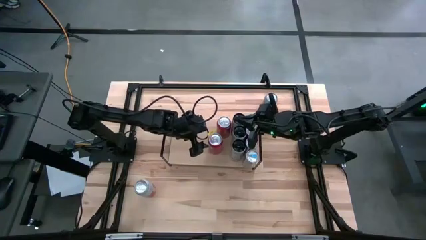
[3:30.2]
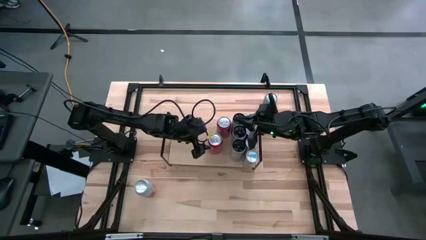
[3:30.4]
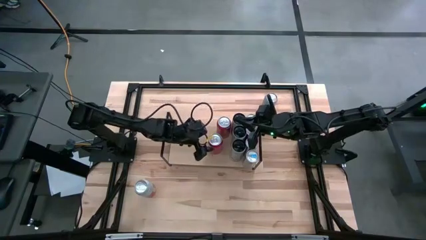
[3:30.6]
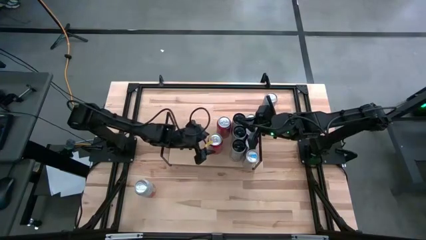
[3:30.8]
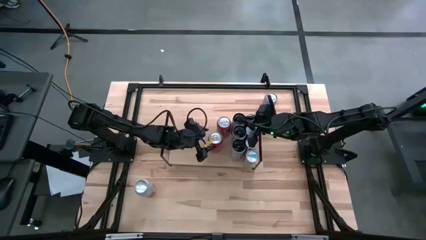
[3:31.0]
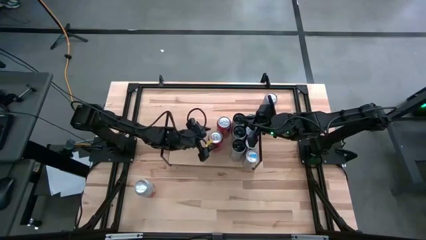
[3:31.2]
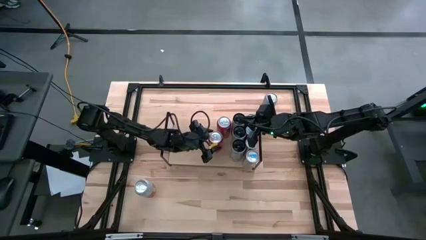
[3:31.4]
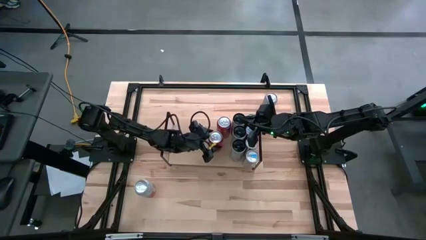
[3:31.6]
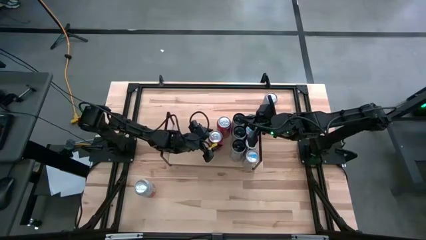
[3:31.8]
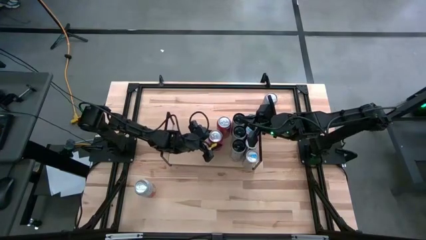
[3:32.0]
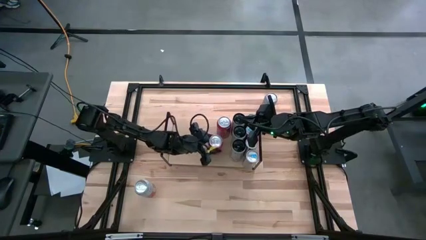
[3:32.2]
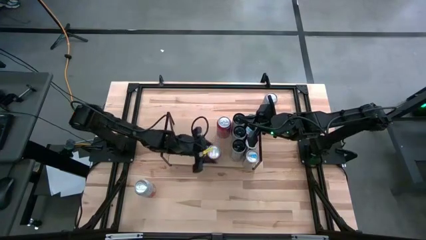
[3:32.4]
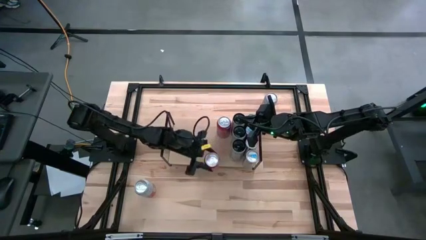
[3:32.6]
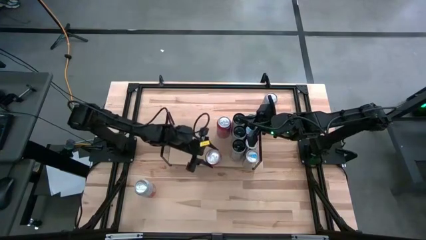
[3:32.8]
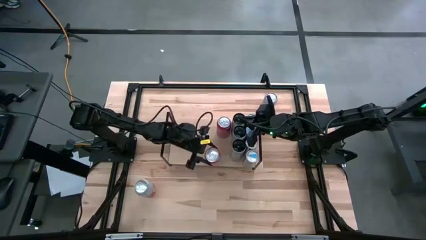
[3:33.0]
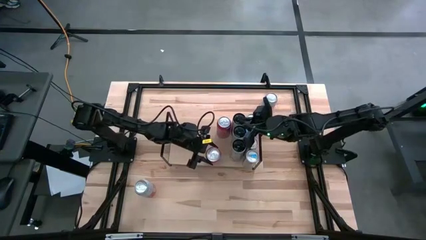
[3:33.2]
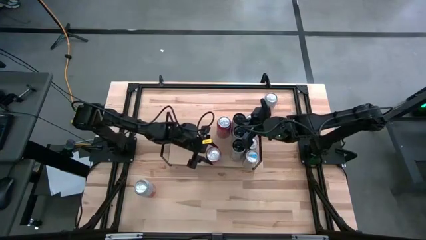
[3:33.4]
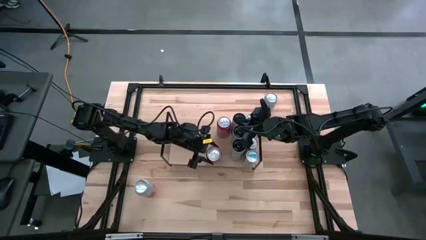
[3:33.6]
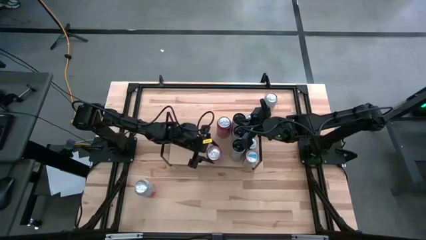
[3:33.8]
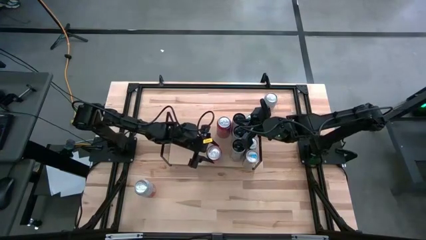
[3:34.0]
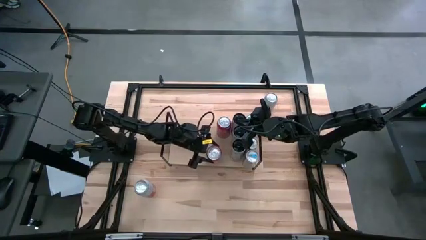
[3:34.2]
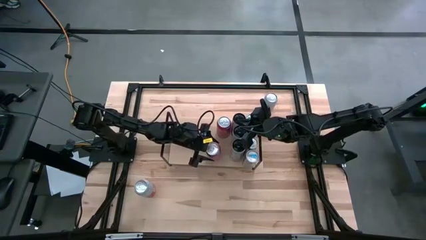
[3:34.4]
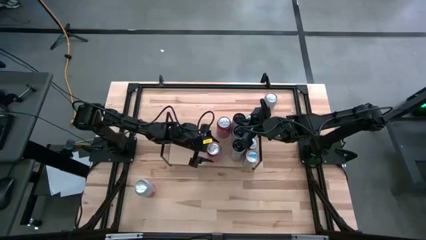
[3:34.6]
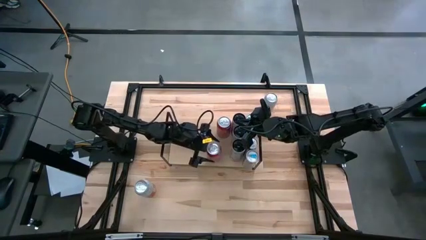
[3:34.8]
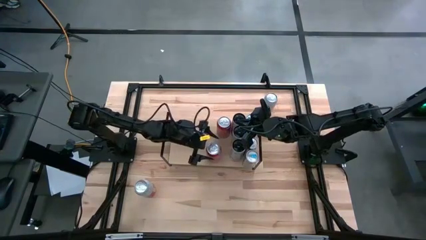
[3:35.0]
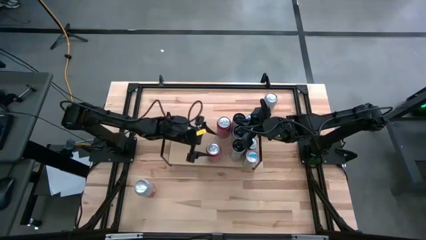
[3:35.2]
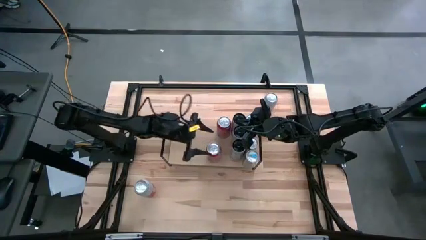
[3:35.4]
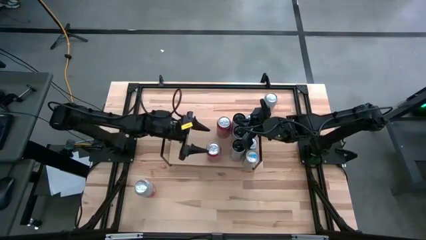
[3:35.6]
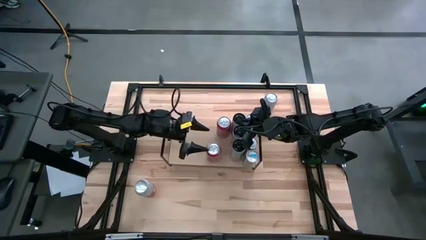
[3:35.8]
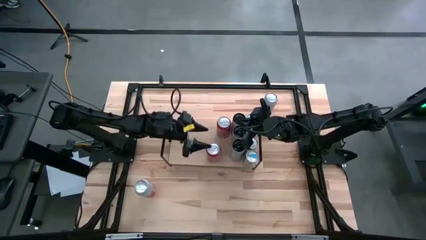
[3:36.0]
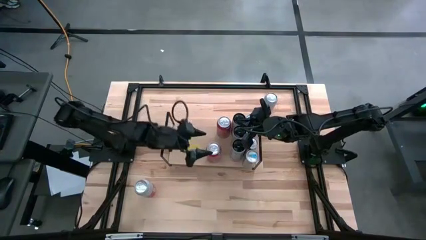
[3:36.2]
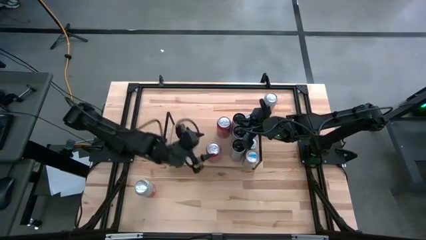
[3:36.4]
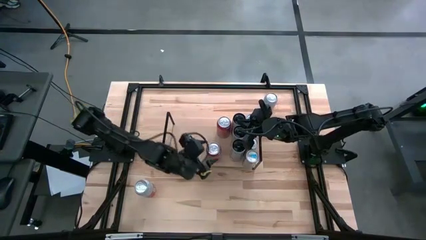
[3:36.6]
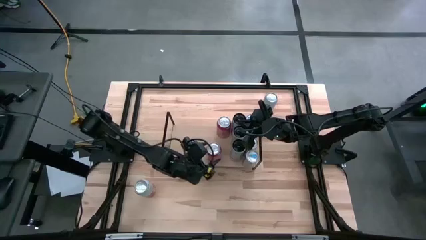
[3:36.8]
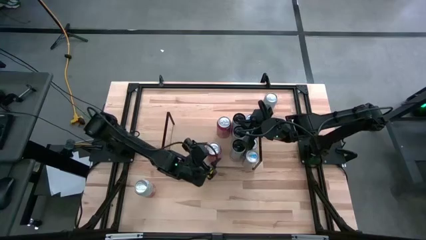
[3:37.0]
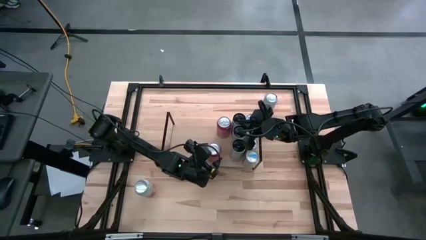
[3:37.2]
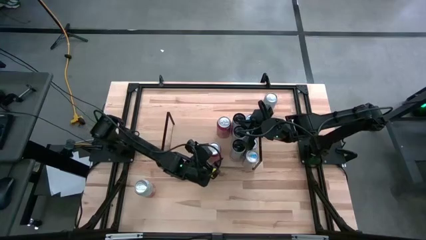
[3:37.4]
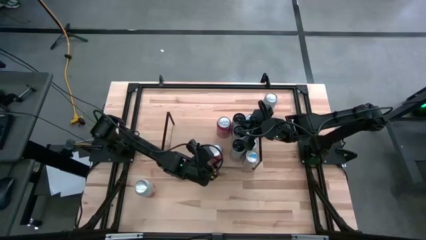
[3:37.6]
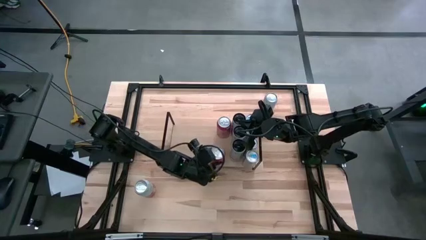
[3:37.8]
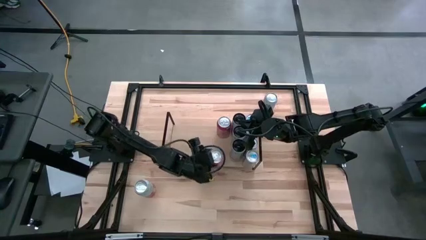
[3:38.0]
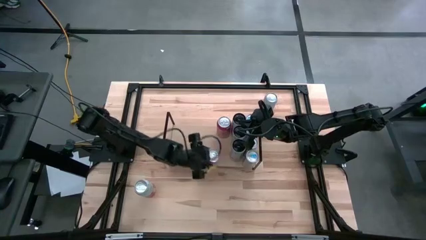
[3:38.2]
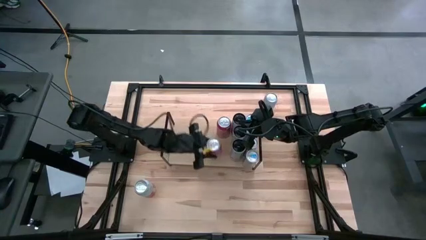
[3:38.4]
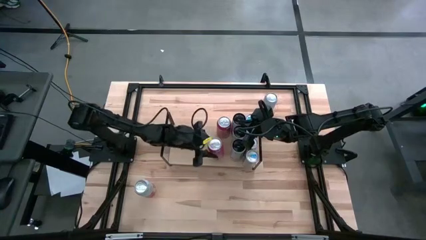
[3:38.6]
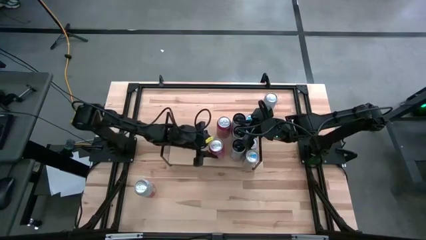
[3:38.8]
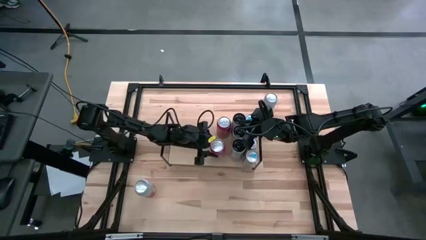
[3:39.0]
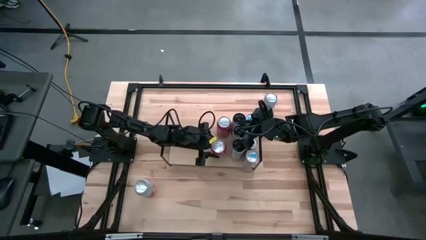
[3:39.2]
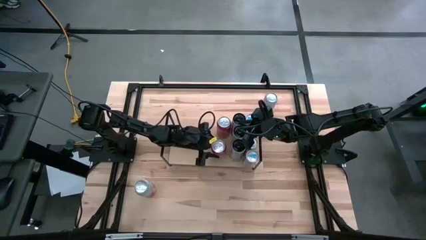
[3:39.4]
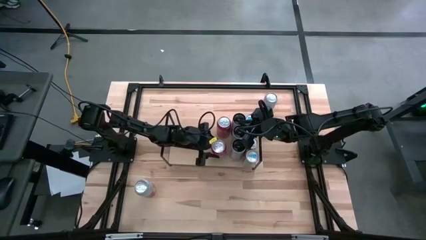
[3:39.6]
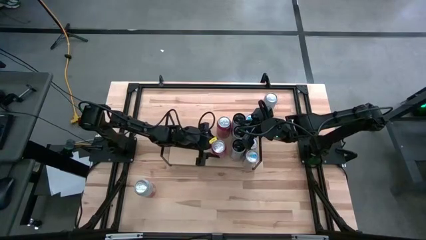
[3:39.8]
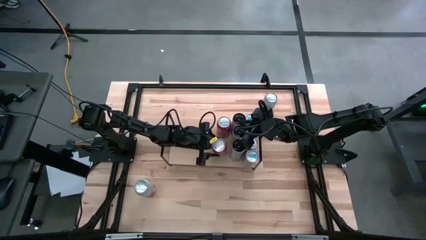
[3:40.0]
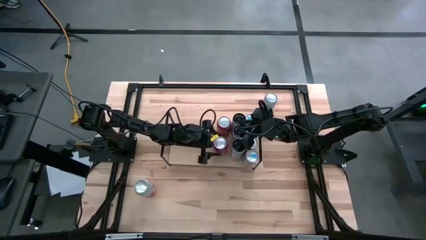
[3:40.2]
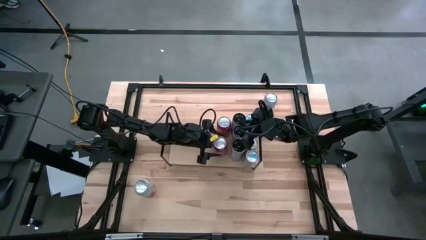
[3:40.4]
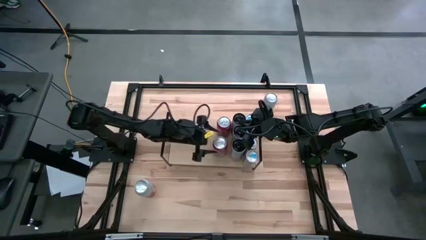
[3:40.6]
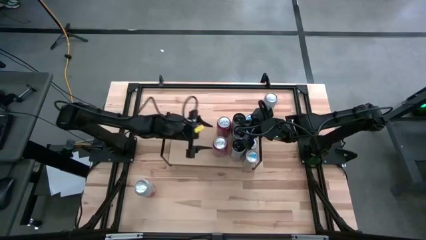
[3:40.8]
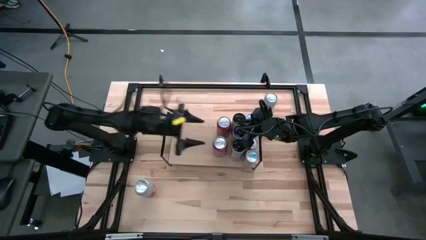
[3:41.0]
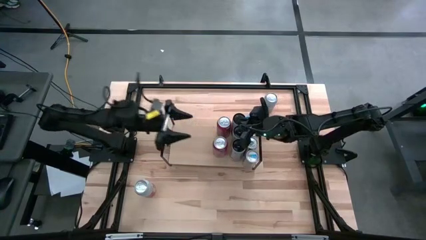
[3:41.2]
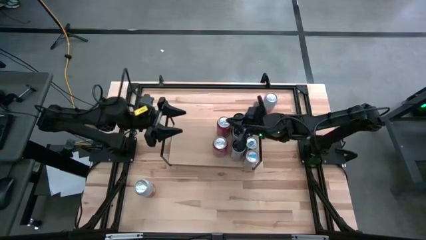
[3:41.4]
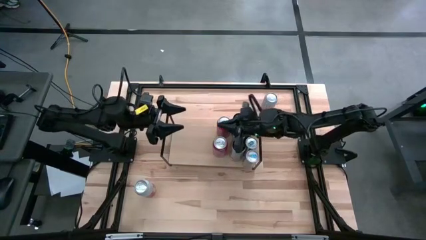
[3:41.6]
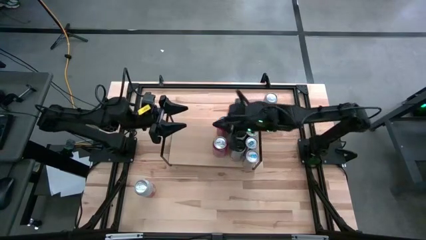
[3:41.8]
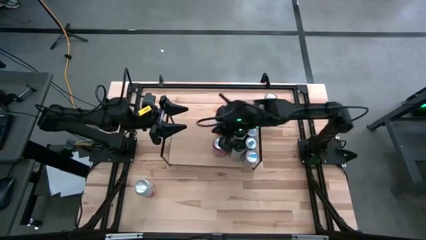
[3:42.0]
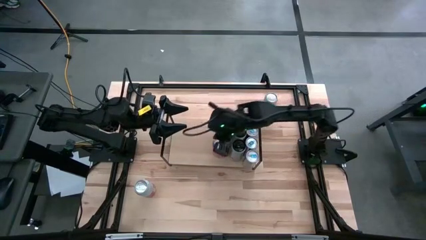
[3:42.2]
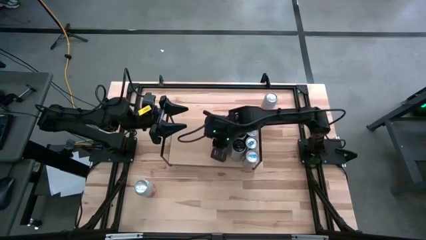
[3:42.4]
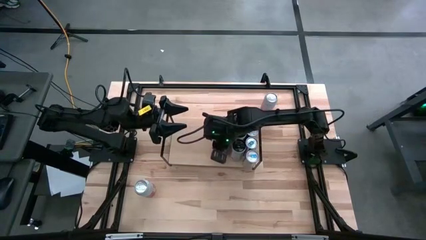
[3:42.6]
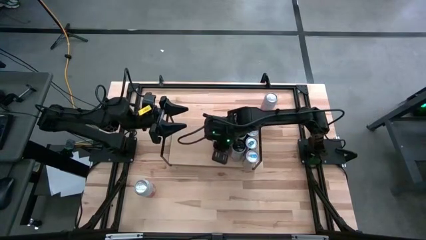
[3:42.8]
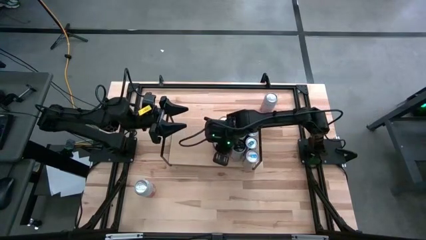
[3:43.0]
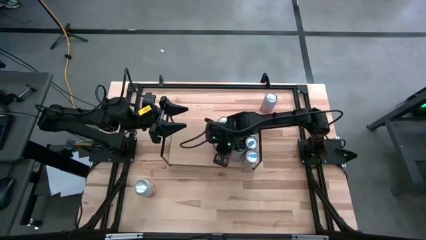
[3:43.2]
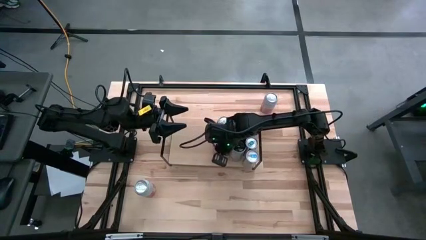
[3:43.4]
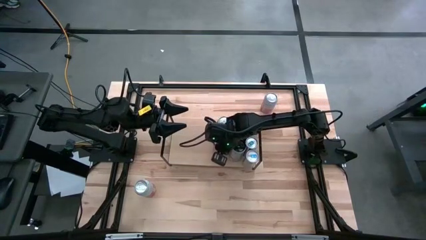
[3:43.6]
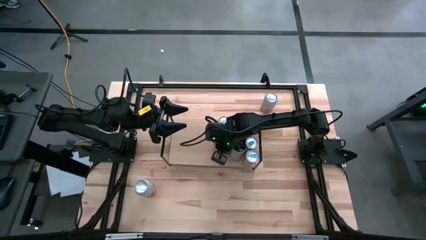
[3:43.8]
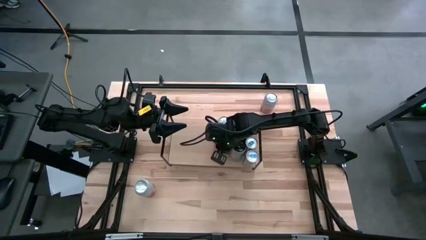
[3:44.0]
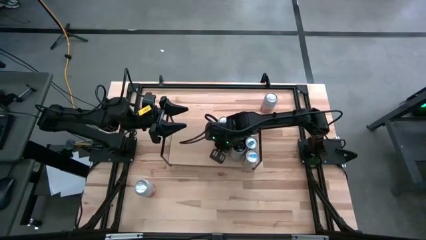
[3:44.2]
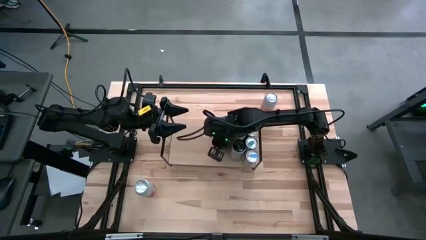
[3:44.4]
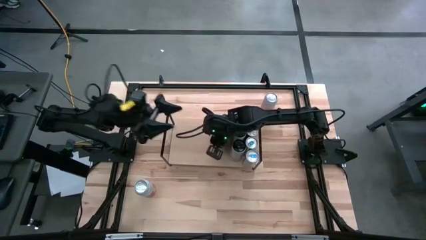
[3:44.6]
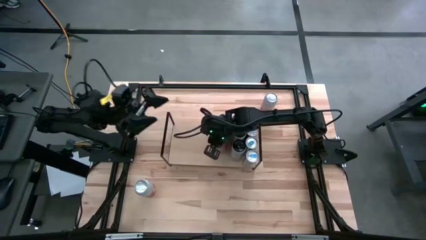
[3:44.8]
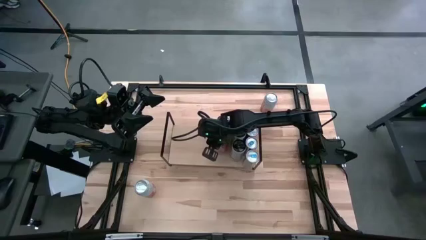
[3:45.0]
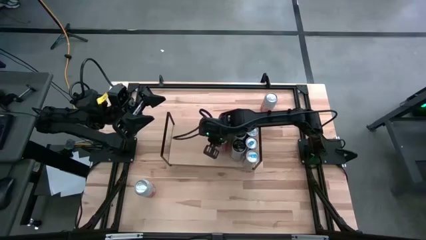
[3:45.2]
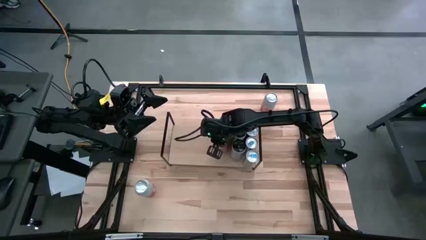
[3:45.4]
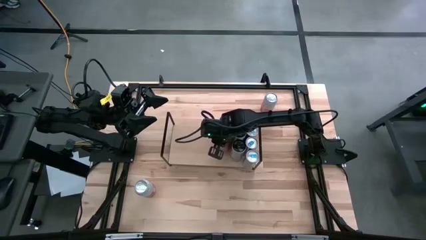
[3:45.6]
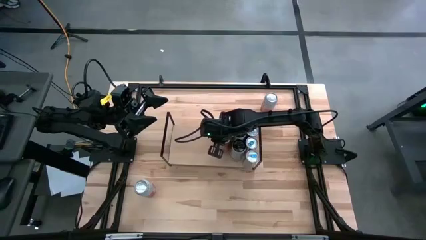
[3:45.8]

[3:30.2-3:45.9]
Task: Place canned beverage on shelf
Put the orange soda can aligned with the other orange soda can on the shelf
